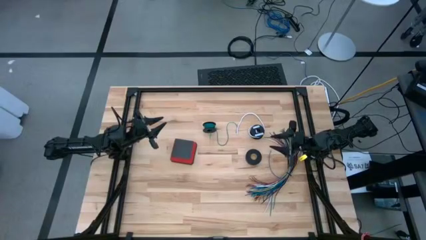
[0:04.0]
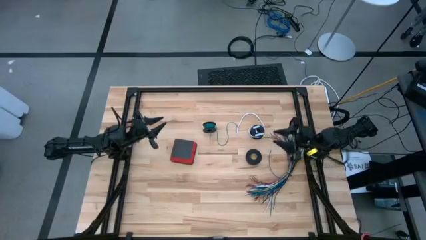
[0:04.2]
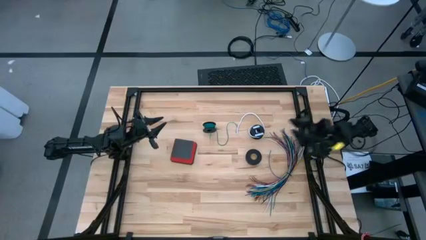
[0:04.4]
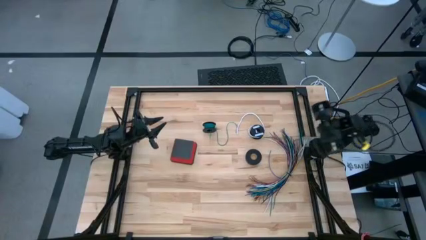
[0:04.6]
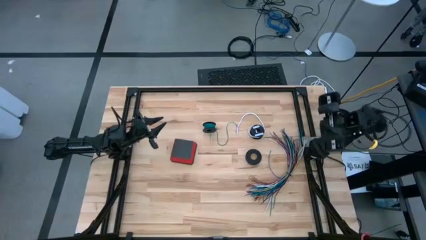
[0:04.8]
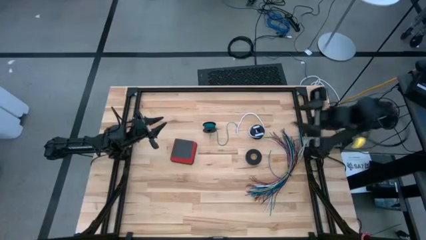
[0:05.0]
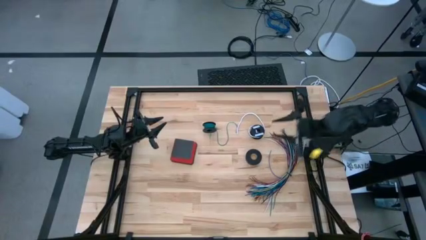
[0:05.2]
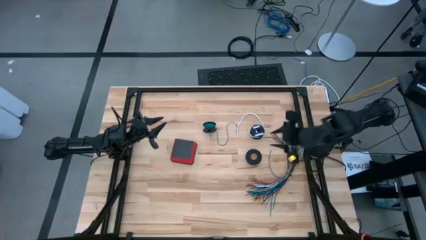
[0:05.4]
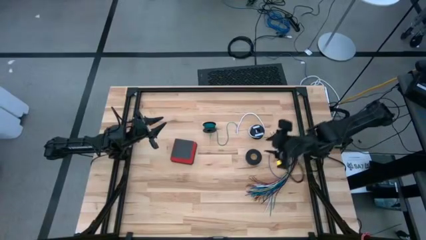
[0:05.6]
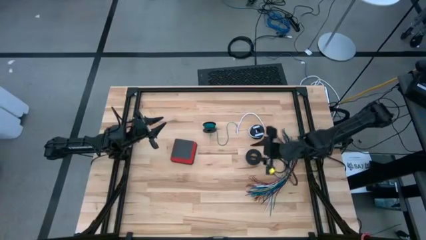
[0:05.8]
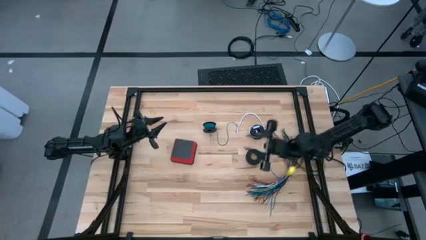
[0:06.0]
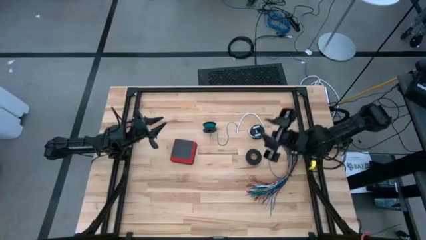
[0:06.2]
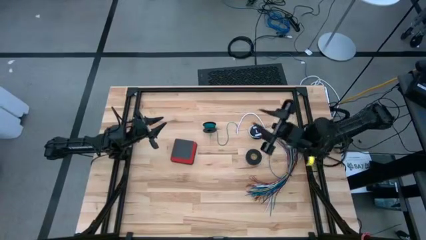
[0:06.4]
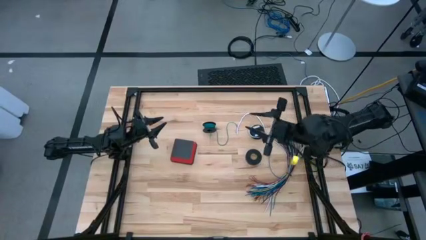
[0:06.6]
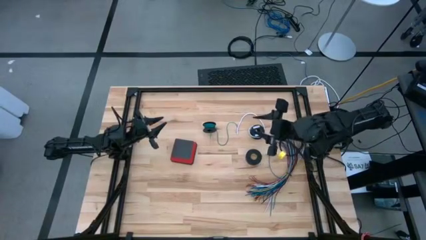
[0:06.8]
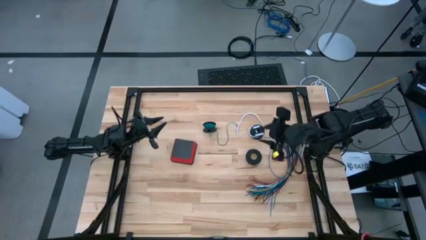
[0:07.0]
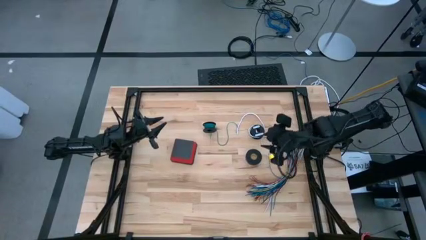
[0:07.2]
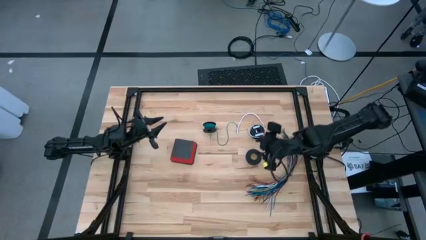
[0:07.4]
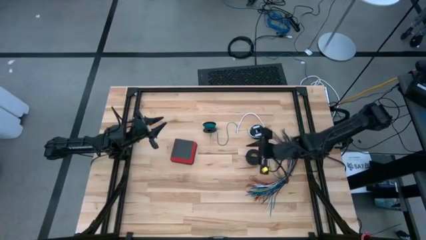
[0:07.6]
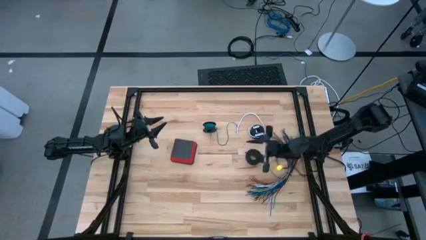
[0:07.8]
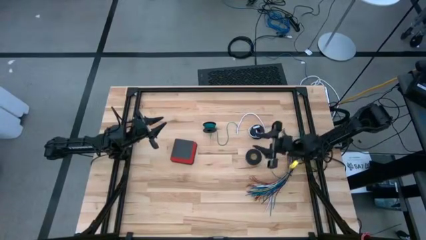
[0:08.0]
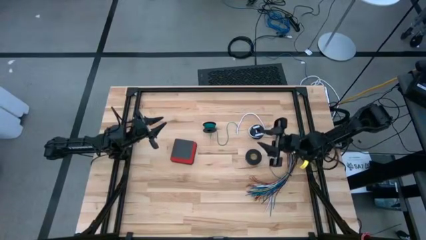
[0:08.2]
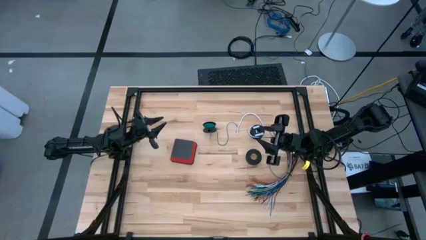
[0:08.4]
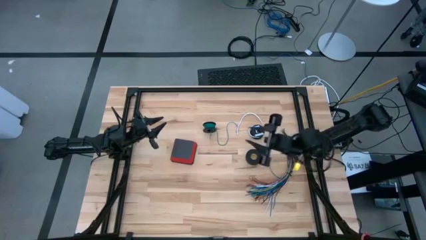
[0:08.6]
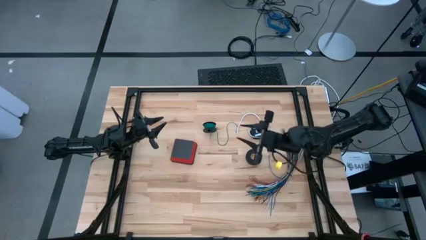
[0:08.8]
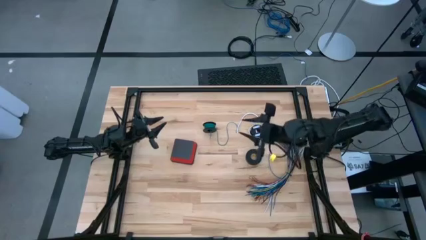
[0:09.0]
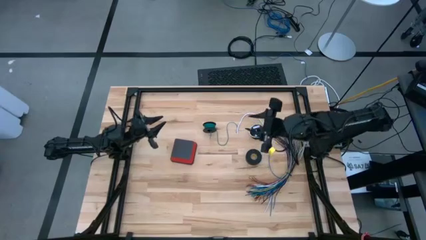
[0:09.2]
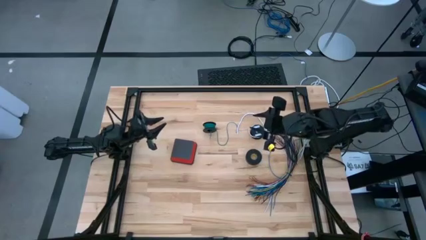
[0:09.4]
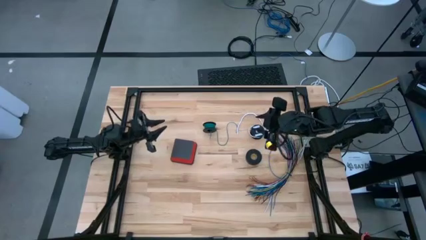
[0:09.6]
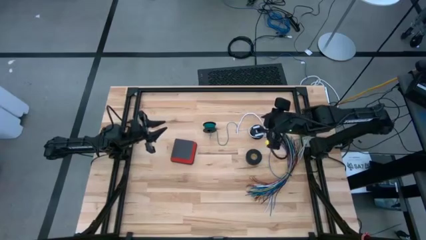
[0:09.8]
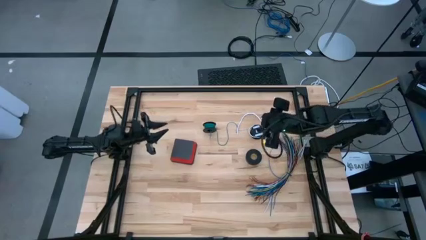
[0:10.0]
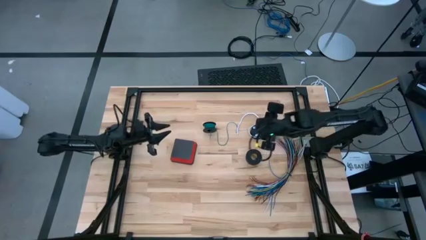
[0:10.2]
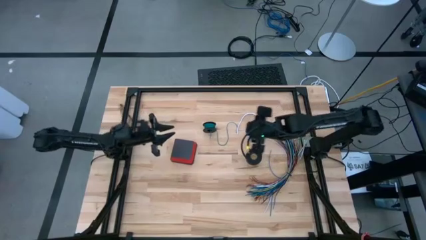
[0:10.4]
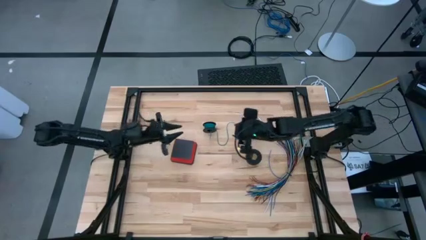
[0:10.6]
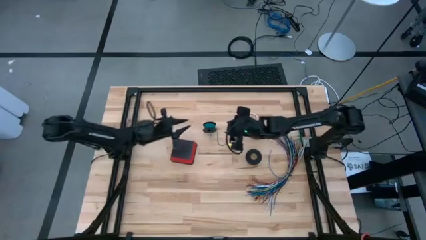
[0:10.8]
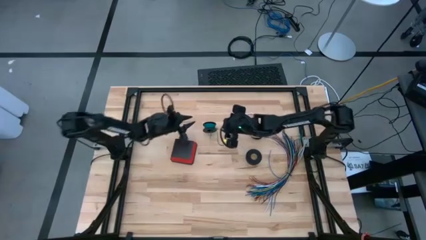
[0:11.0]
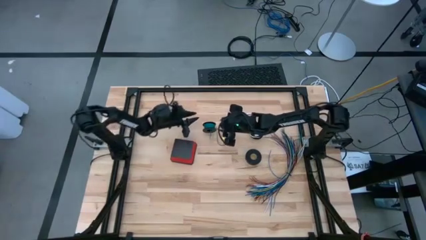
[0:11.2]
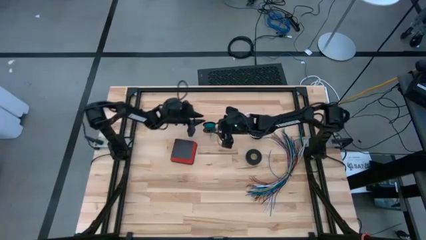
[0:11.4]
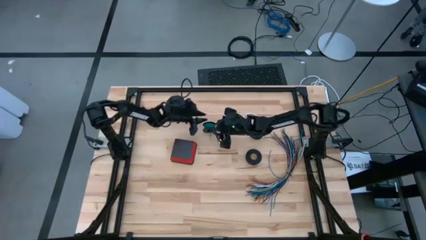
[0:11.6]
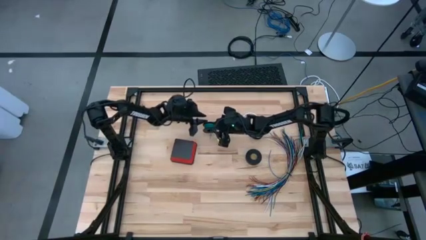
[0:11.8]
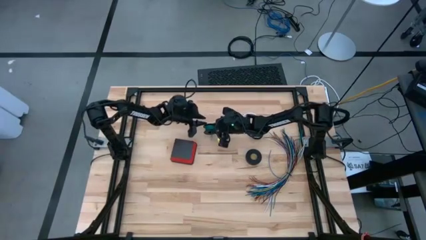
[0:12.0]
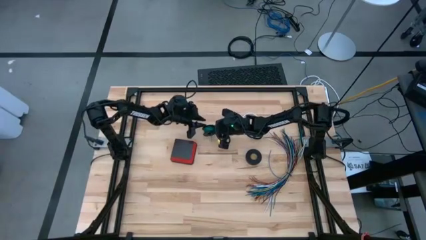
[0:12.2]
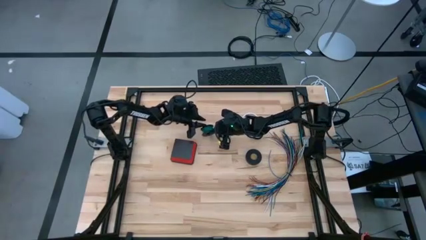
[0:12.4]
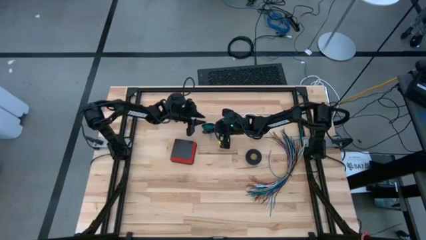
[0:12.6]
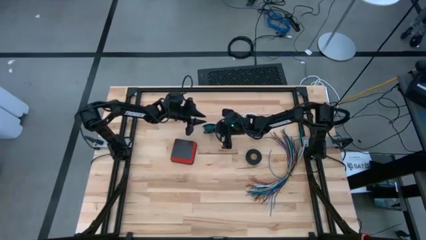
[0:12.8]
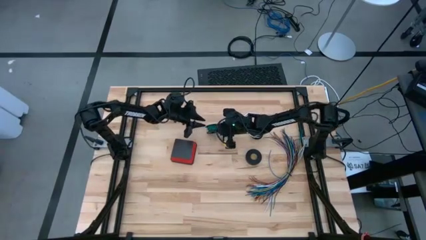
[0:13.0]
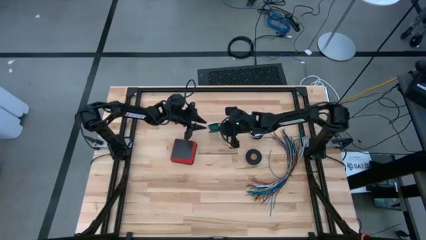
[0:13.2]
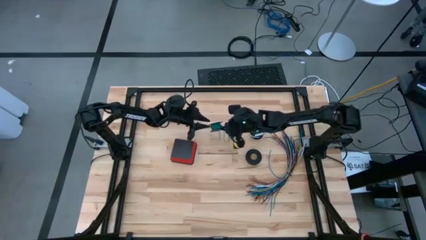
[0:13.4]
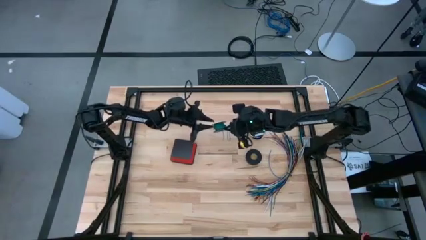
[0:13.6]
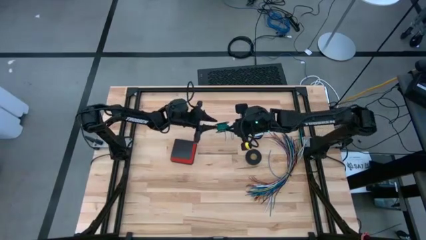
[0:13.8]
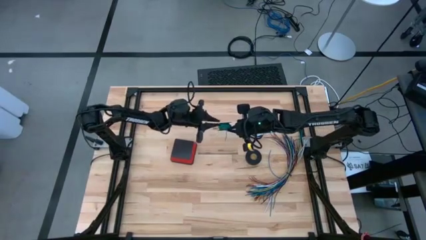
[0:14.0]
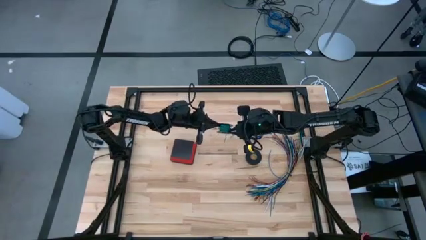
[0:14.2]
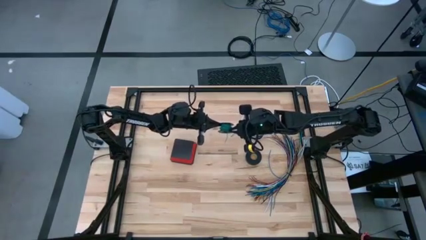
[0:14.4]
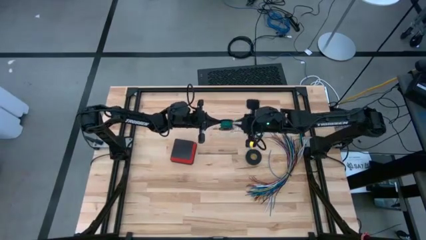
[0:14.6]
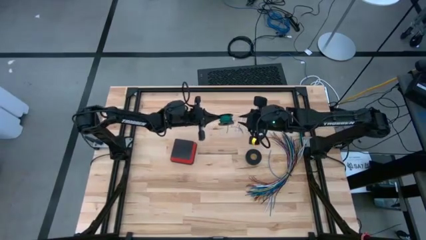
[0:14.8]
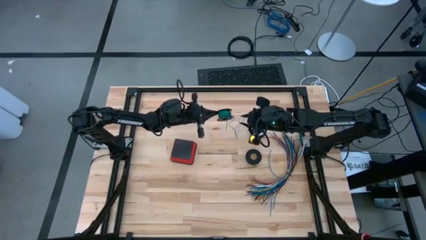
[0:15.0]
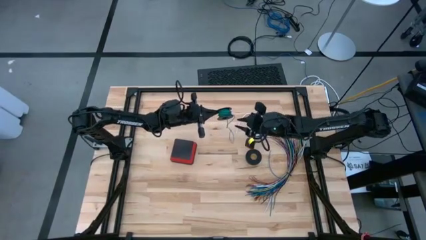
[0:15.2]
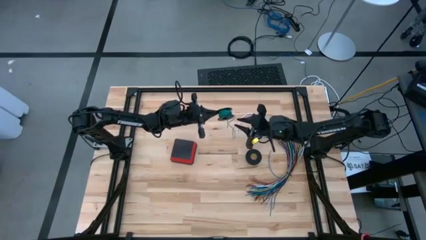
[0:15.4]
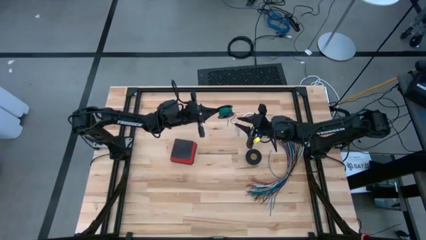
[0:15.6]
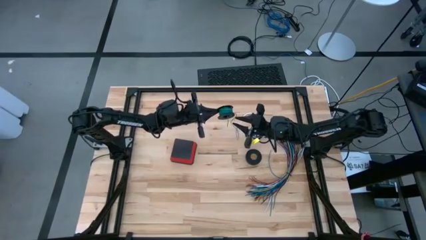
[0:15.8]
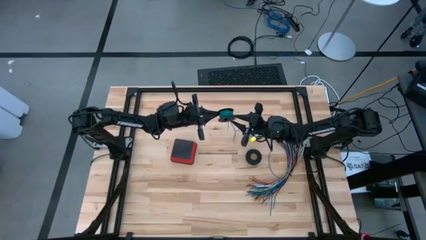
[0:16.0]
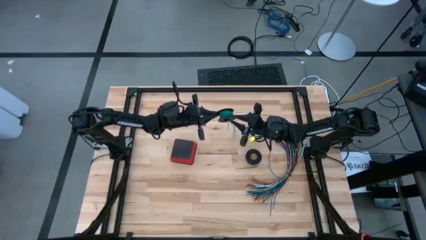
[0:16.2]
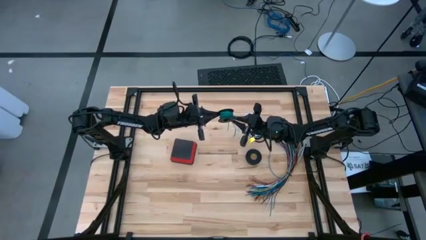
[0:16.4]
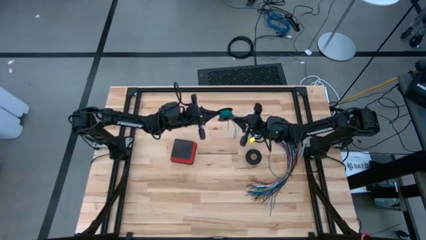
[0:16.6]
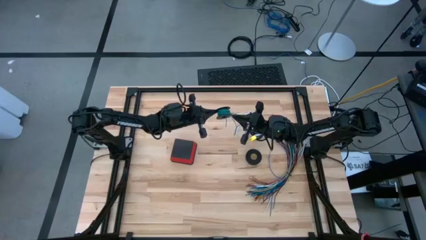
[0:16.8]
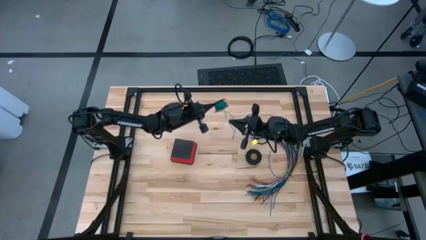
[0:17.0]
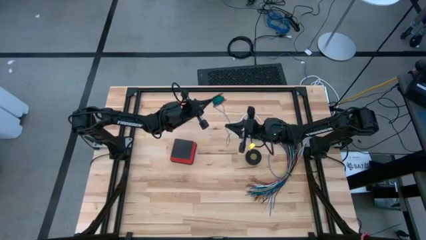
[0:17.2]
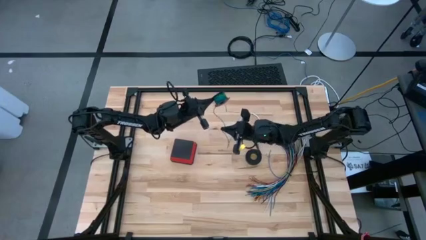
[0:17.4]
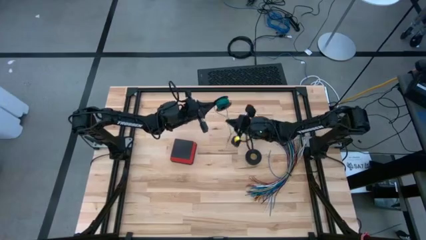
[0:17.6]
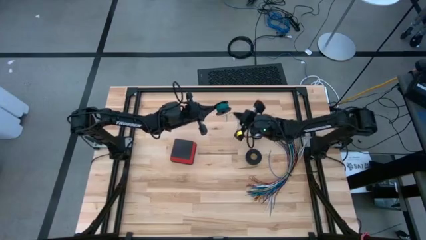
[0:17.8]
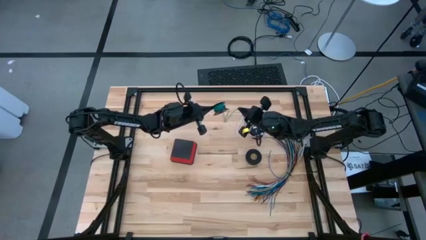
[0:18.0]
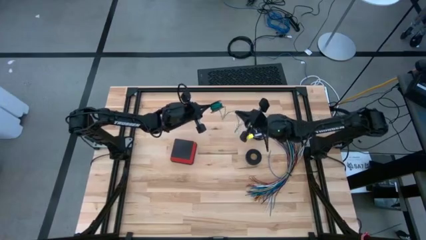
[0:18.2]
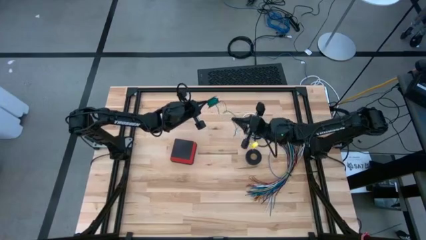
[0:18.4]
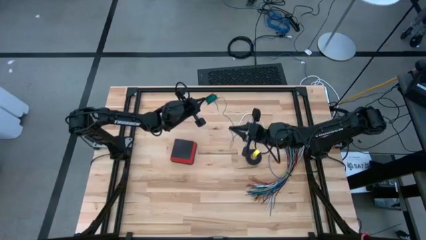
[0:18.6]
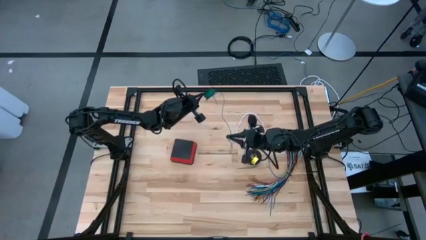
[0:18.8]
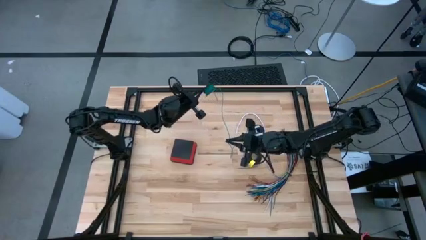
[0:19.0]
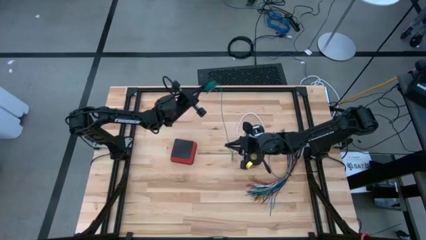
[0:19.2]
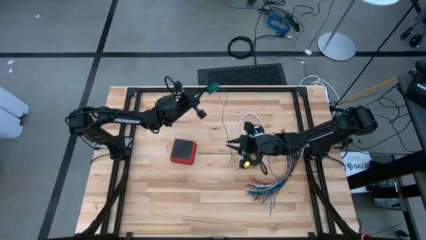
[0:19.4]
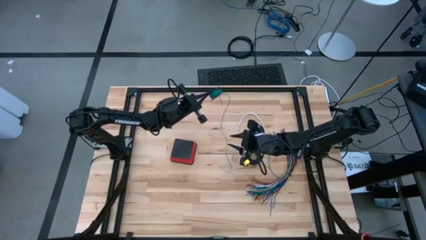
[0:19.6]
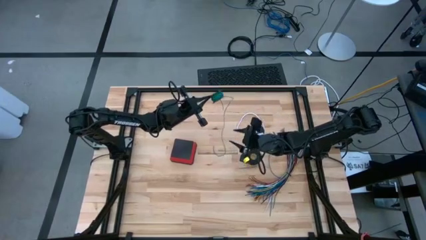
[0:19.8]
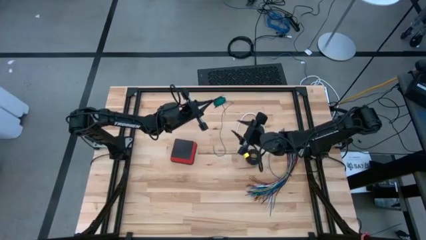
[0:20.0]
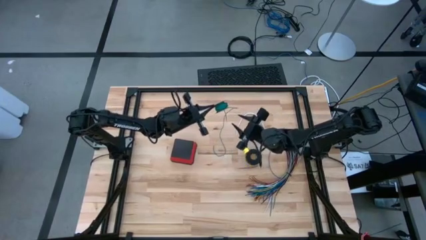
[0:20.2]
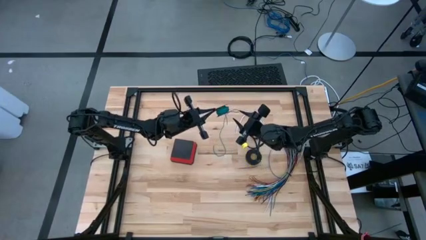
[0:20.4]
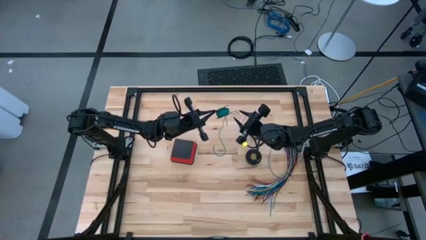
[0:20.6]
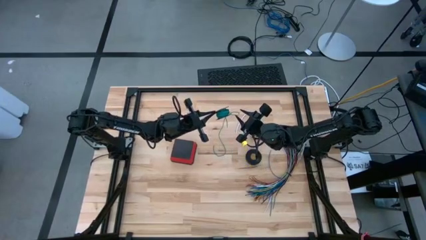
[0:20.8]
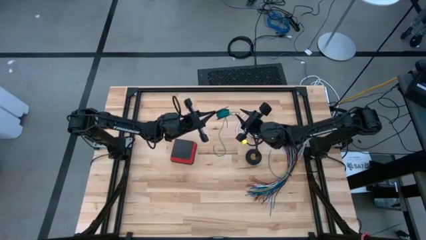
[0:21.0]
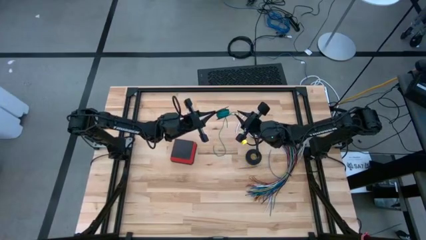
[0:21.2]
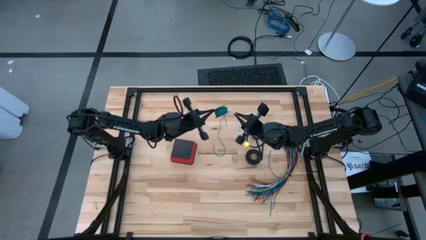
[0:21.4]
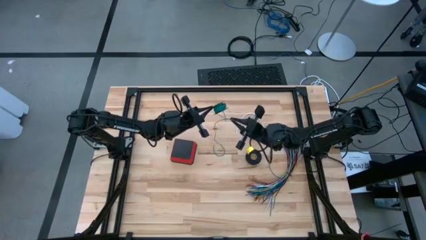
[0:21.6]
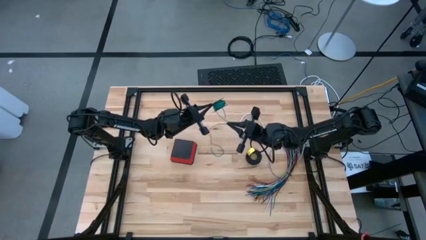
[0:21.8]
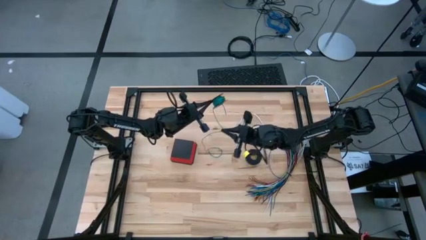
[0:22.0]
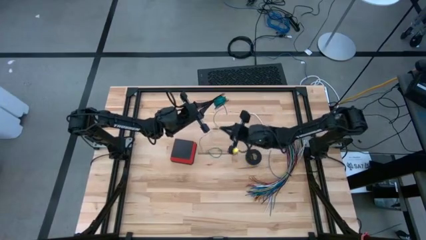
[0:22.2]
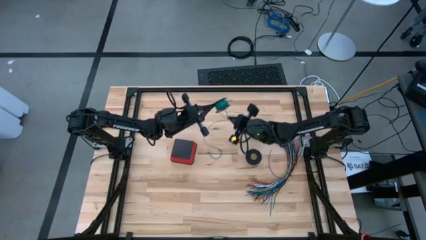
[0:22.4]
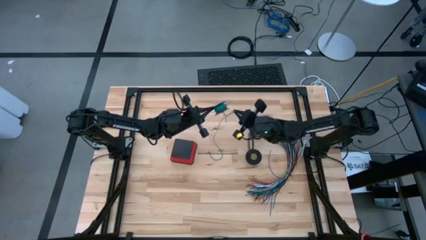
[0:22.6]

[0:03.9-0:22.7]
Task: Coiling cords
Uncoil the green wire cable from the spool
